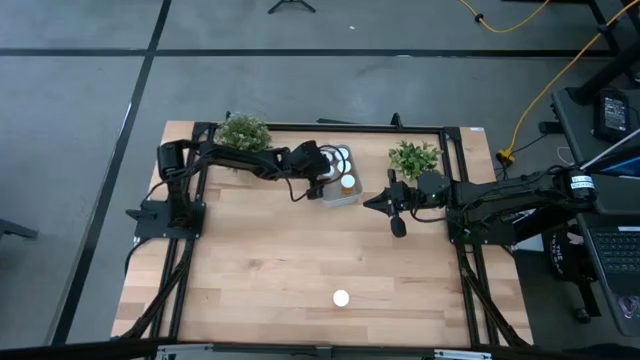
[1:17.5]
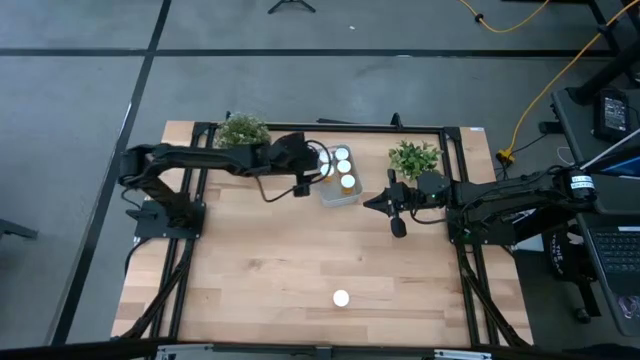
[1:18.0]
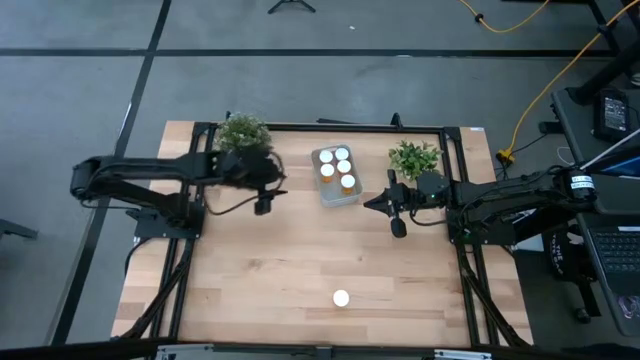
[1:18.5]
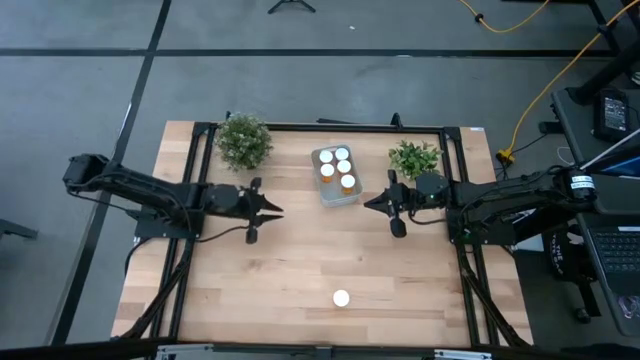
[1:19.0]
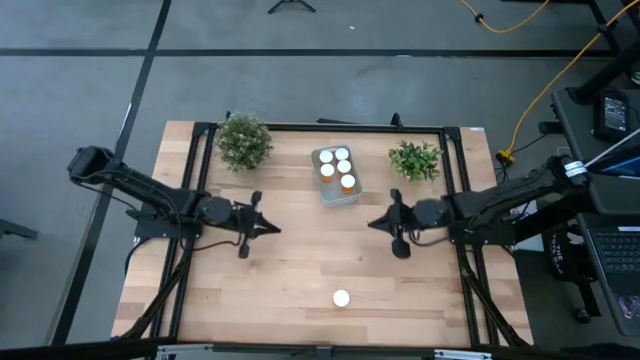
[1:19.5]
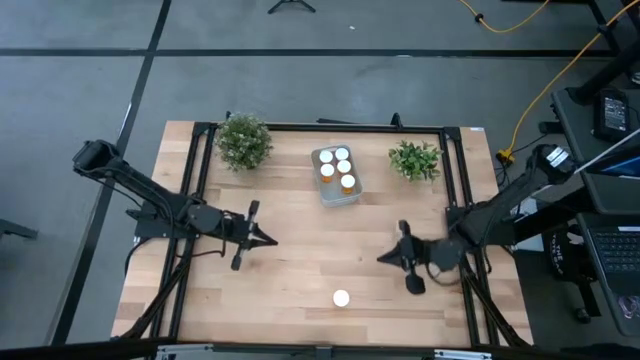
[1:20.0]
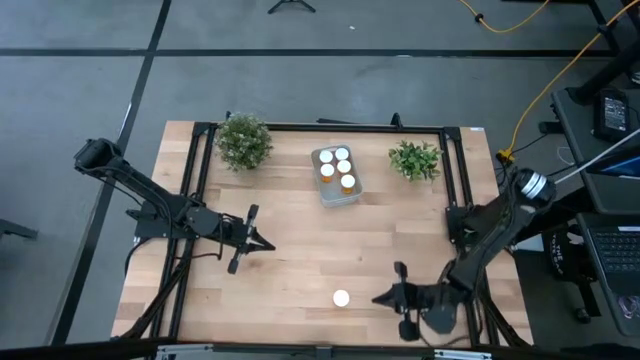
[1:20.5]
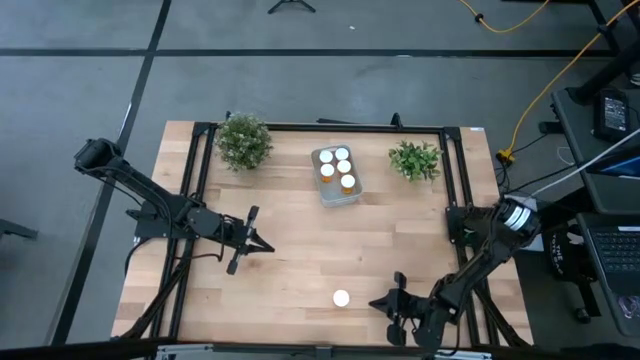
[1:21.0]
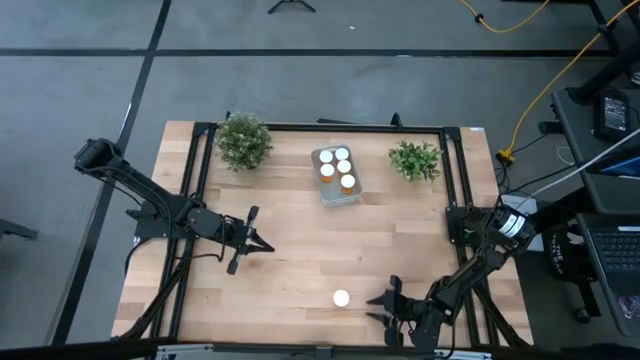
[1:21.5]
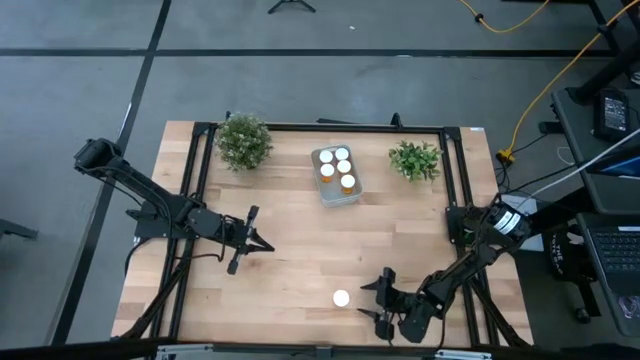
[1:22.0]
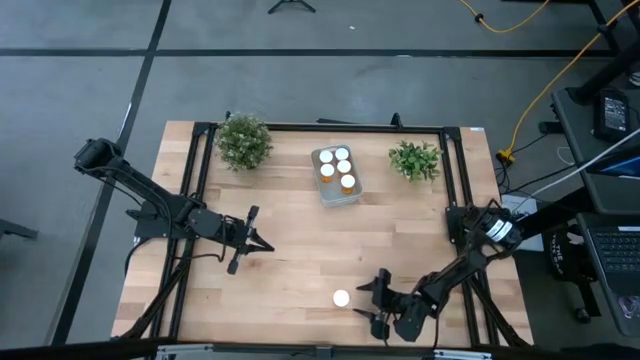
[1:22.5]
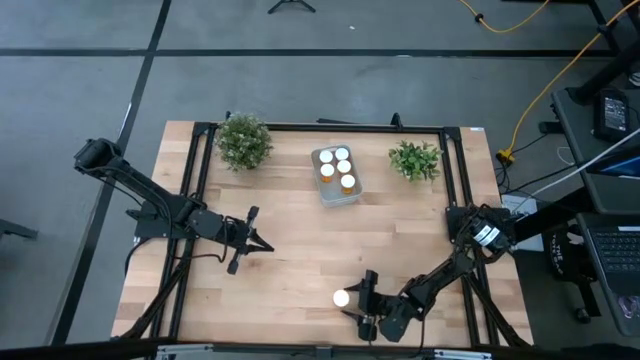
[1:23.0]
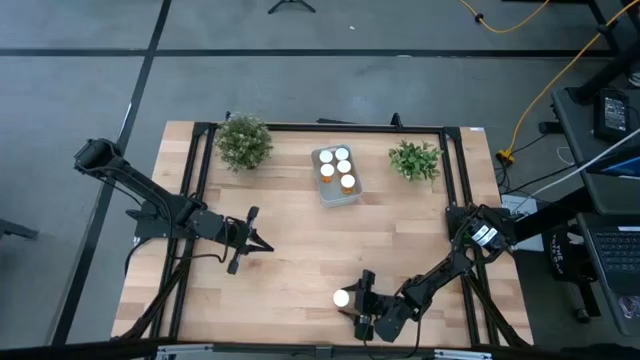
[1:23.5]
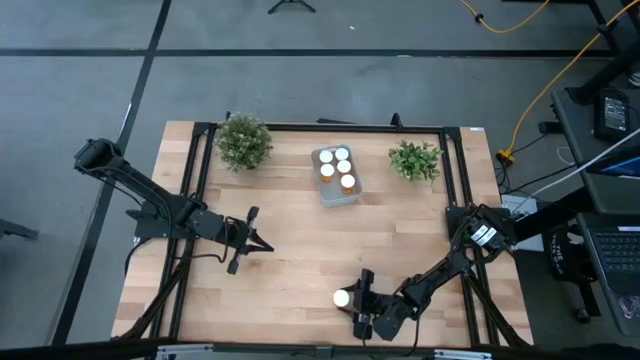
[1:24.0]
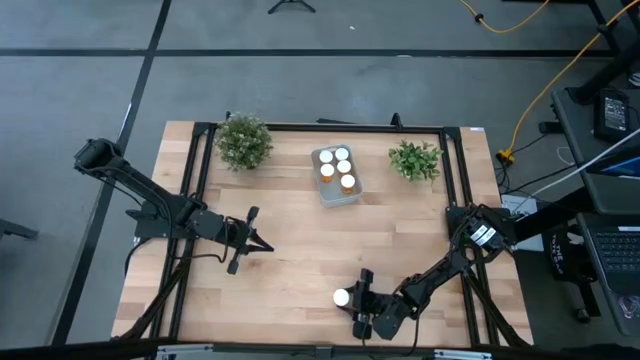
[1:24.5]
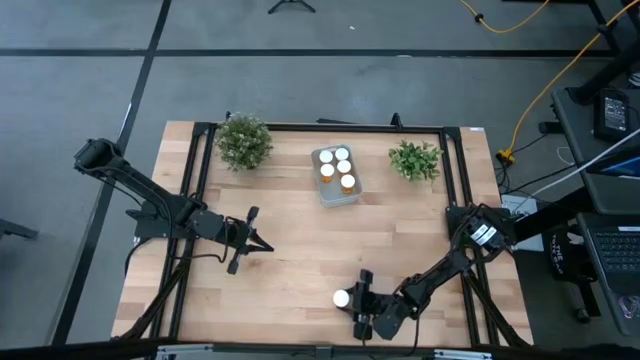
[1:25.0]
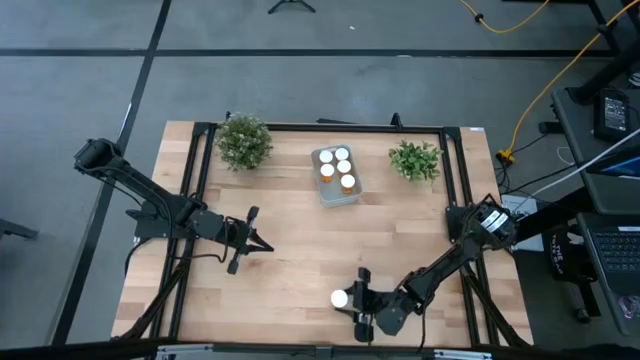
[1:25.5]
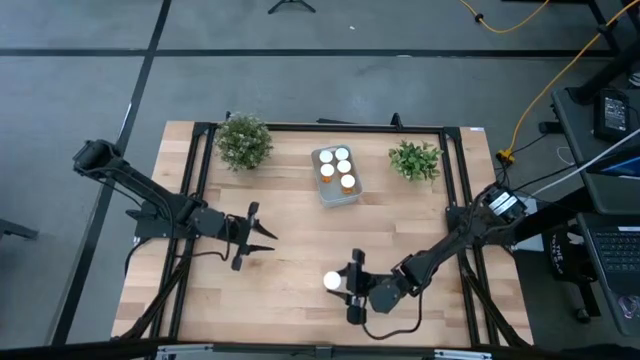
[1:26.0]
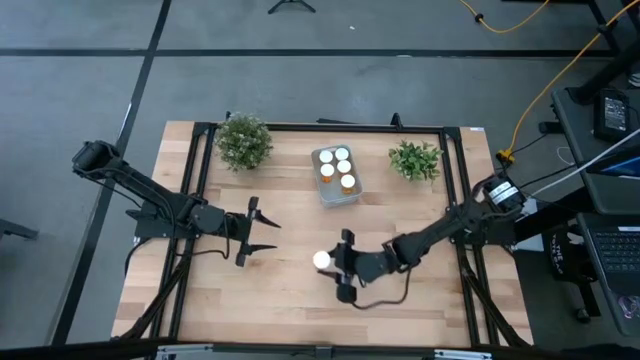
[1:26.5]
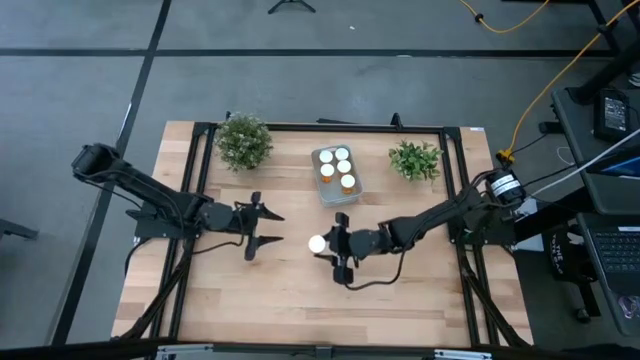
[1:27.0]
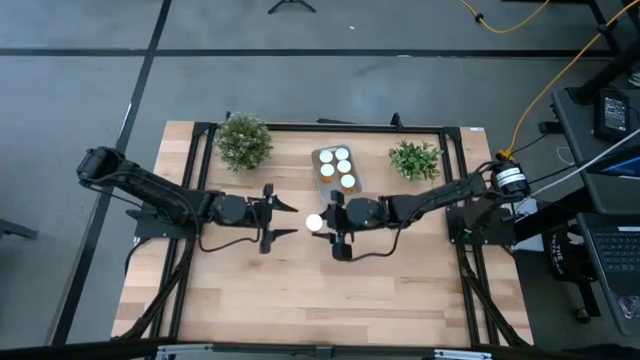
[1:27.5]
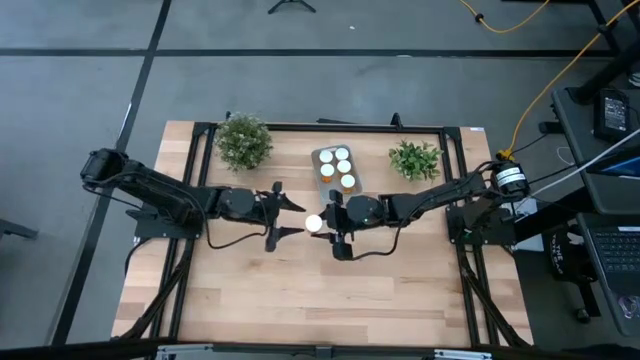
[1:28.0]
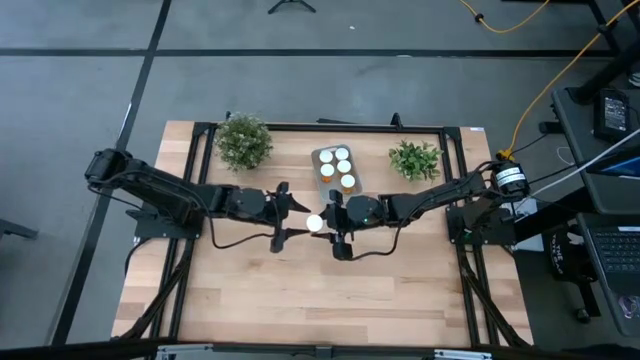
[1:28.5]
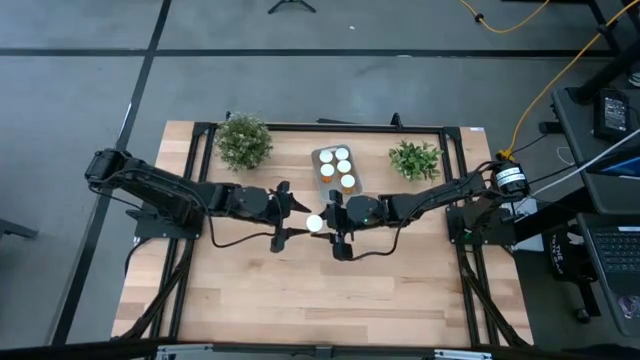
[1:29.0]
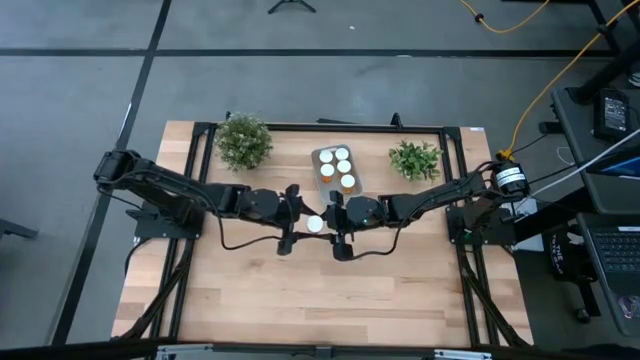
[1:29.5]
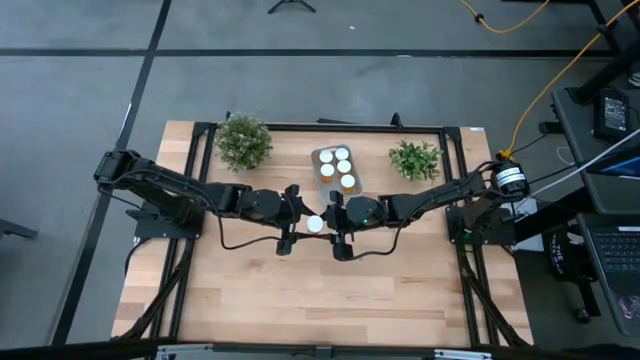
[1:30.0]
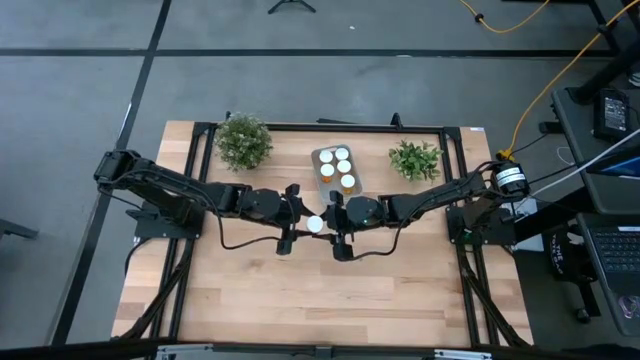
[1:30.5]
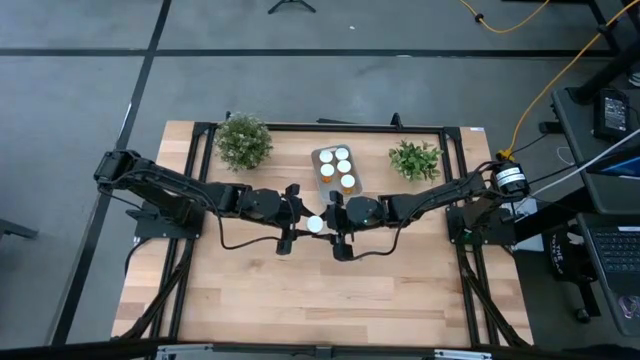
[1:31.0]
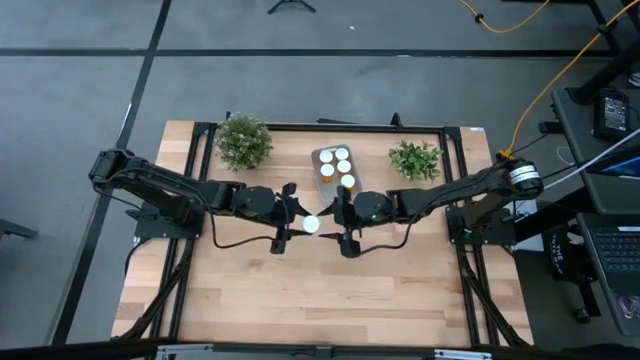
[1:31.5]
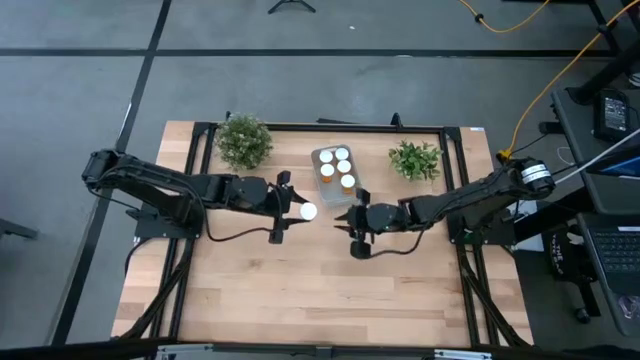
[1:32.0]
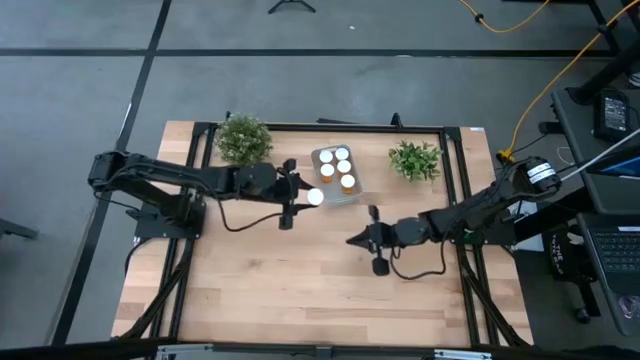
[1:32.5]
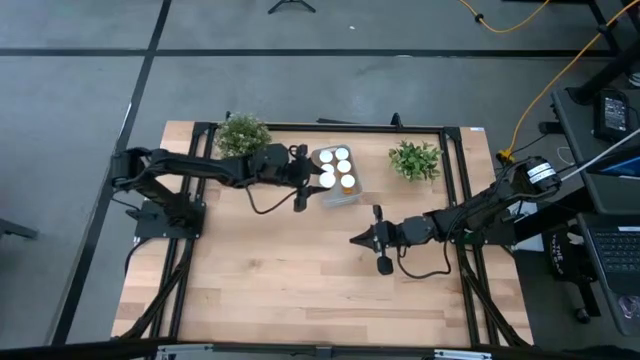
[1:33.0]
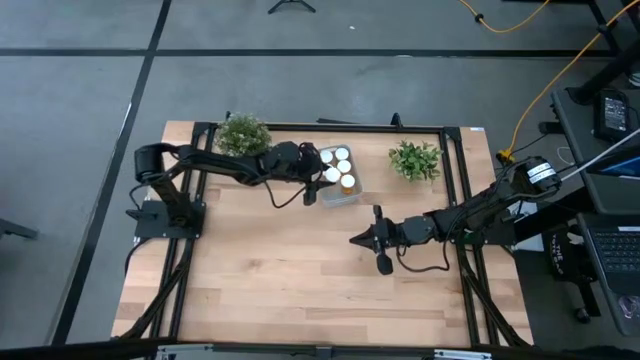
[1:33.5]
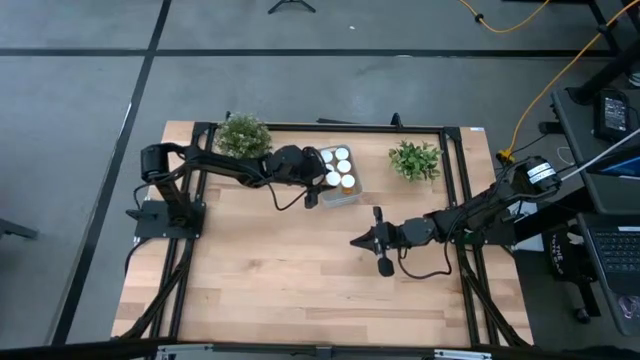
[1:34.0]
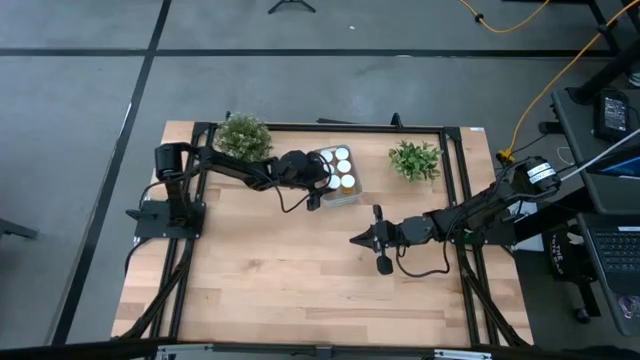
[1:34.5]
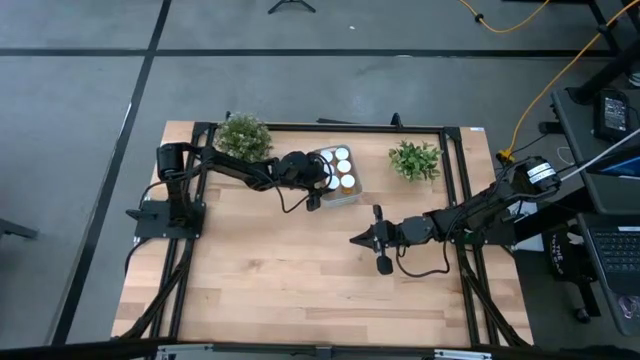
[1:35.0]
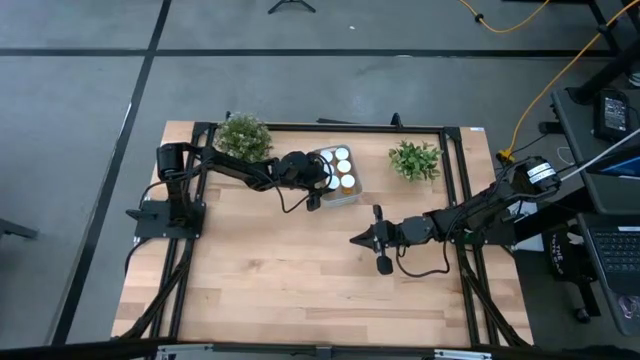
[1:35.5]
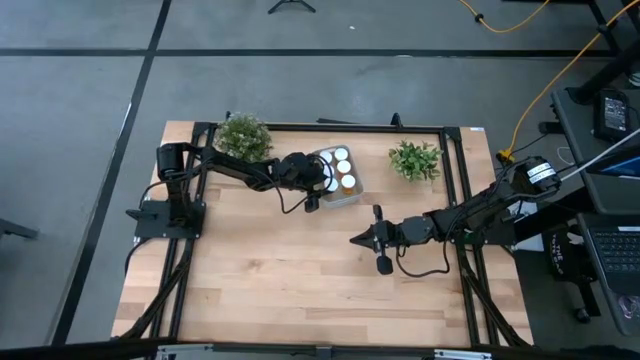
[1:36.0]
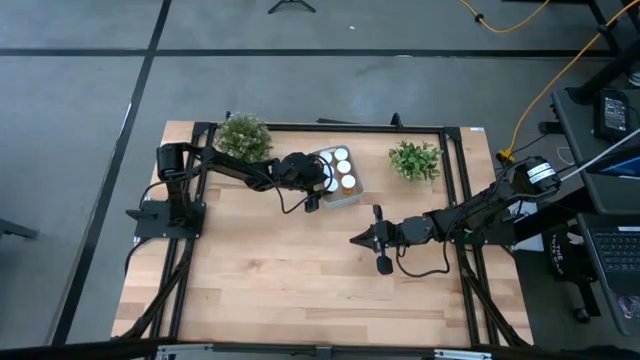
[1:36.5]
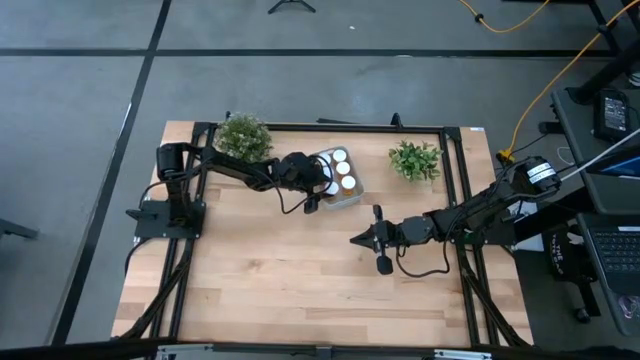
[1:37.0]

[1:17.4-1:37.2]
Task: Pick and place pill bottles into a basket
Put the orange pill bottle into the gray bin

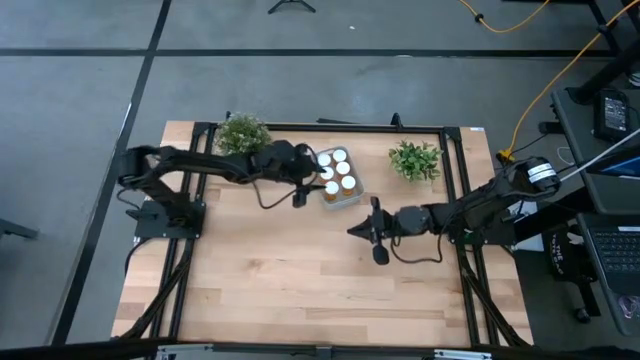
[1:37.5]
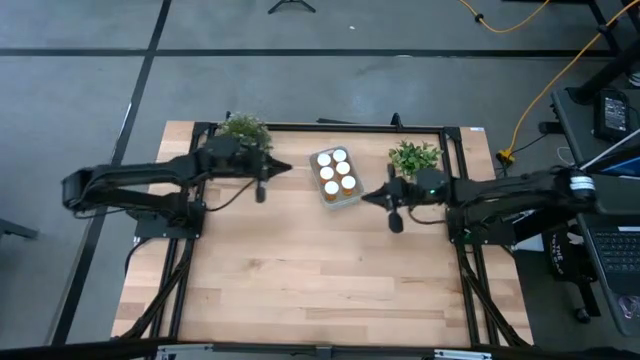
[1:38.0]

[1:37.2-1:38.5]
Return to Home Position

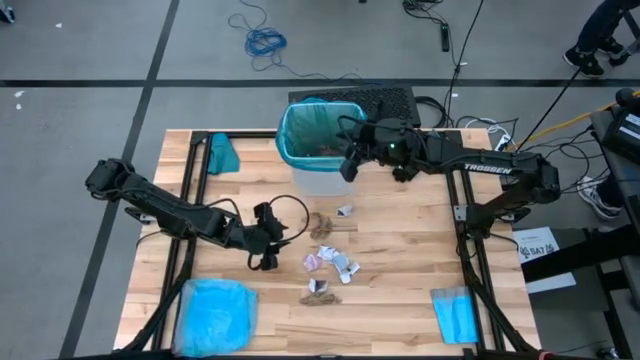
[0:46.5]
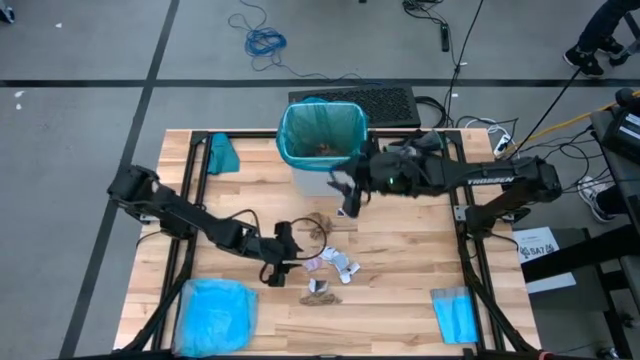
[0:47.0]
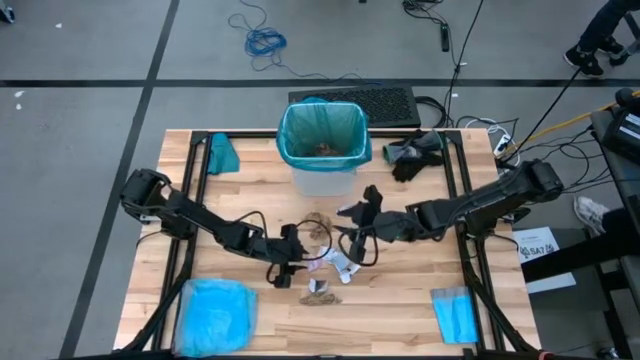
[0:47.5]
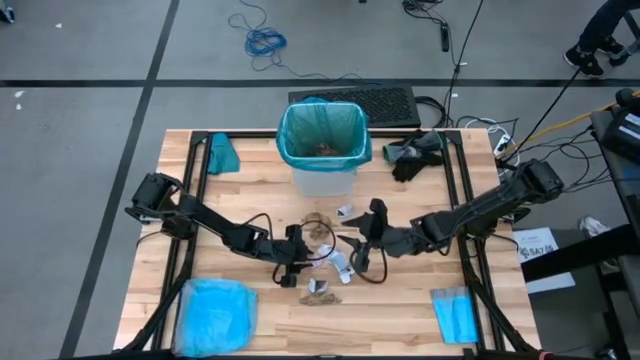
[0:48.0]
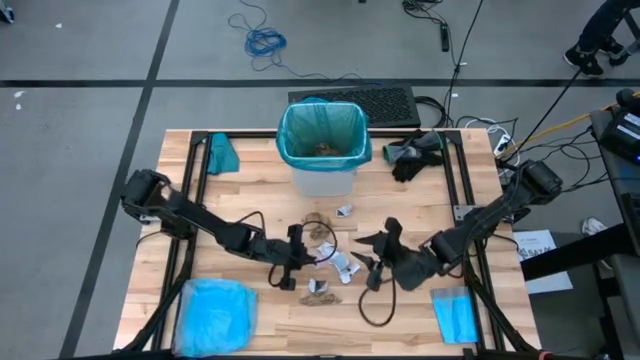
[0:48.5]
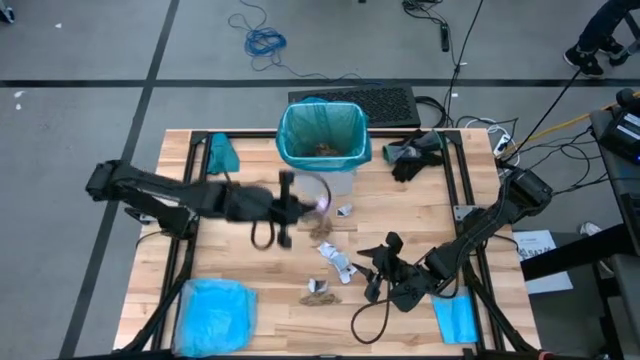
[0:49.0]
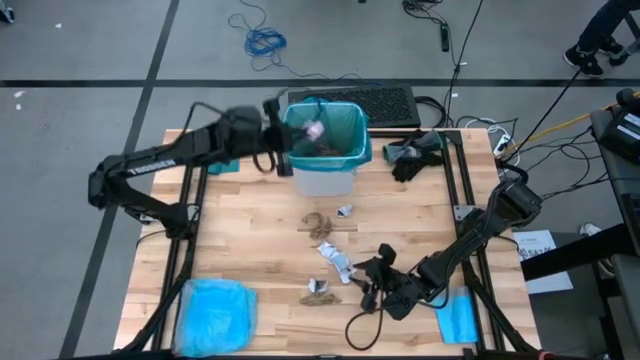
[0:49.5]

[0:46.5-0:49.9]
Task: place trash/remove bag and relplace
Put the pink trash bag into the trash bin
